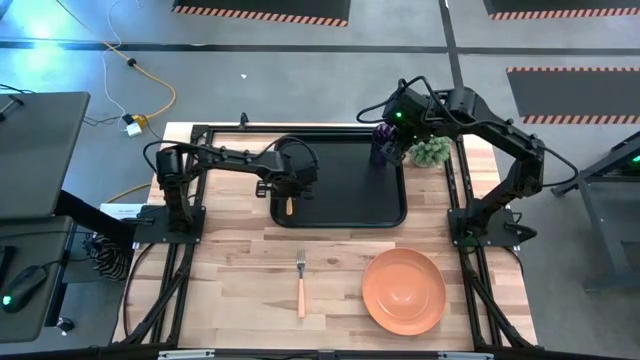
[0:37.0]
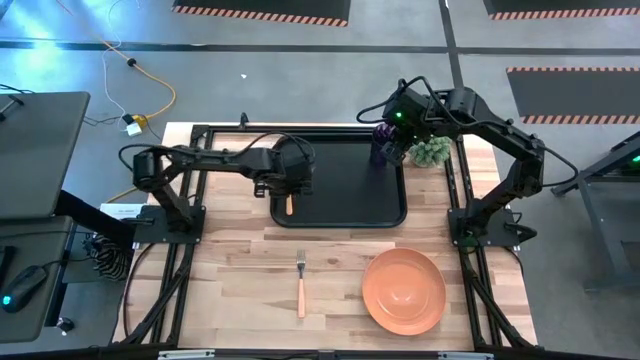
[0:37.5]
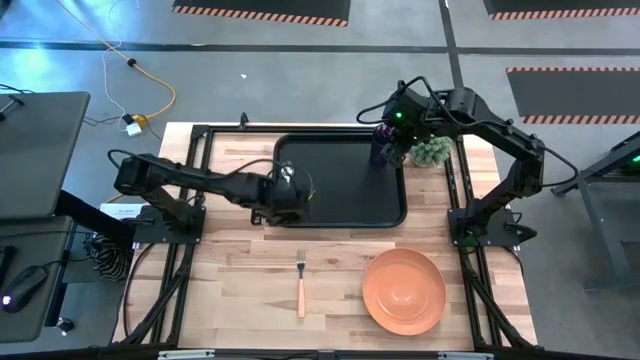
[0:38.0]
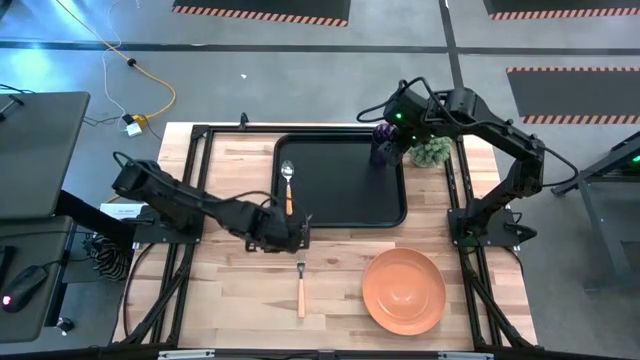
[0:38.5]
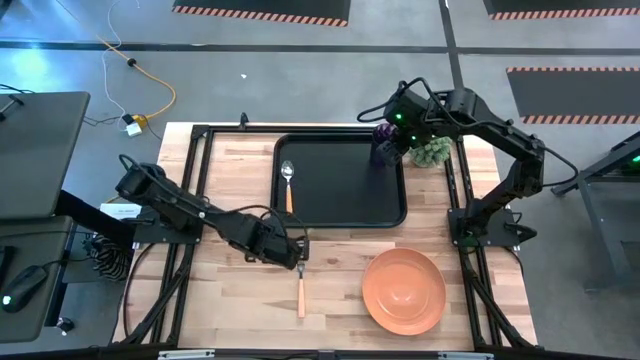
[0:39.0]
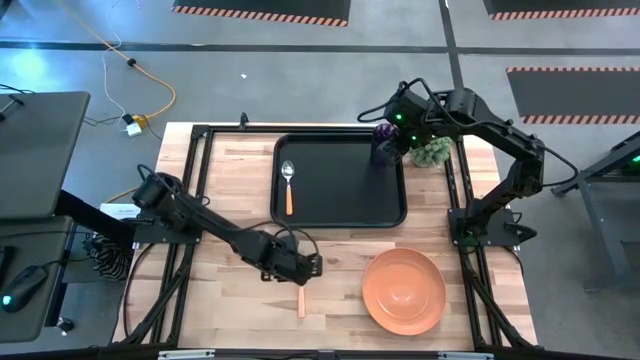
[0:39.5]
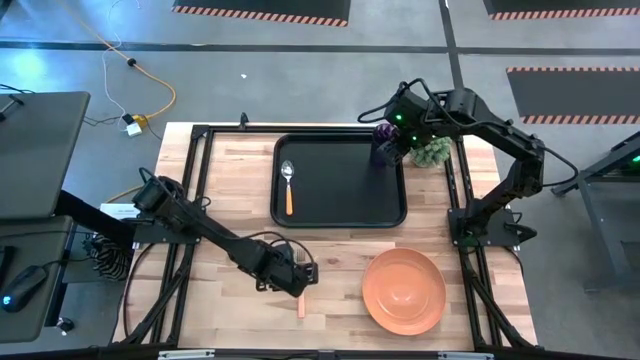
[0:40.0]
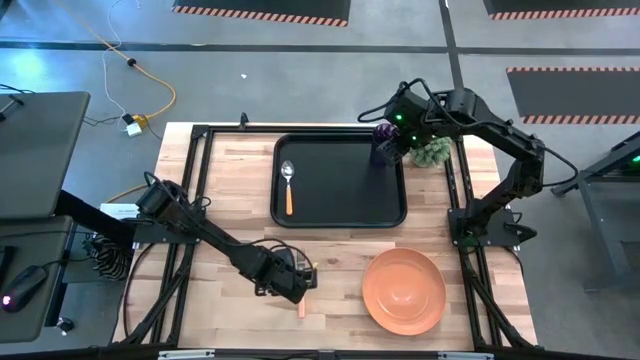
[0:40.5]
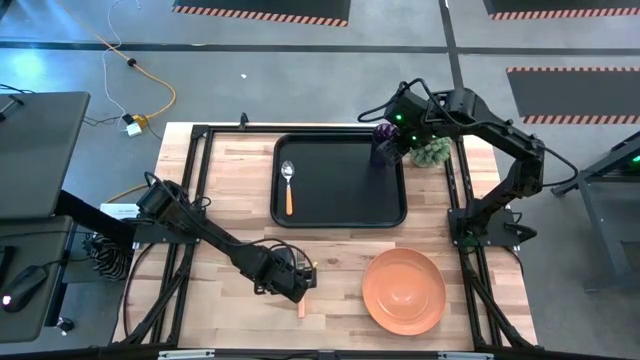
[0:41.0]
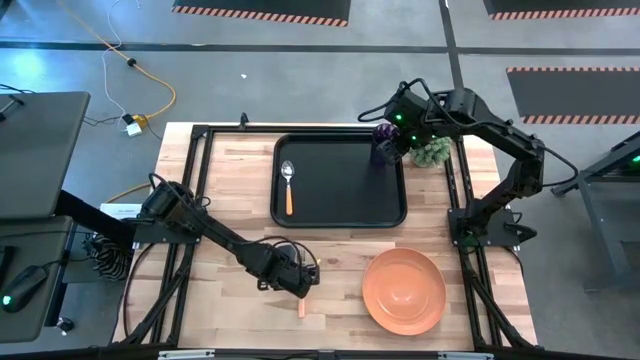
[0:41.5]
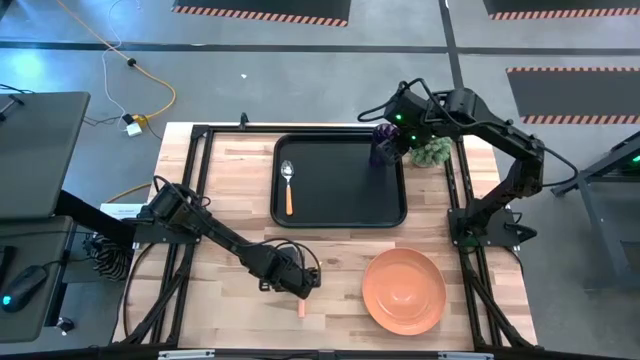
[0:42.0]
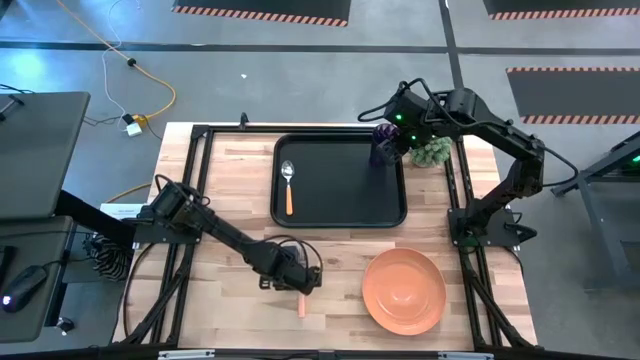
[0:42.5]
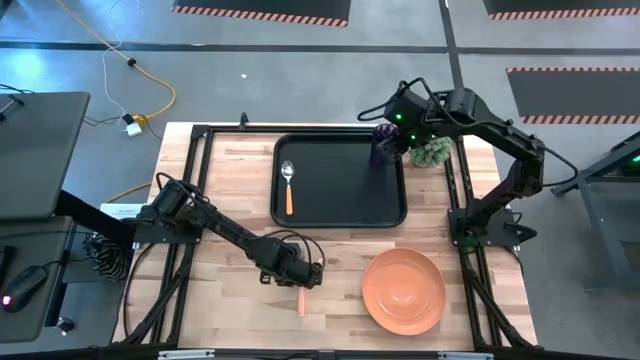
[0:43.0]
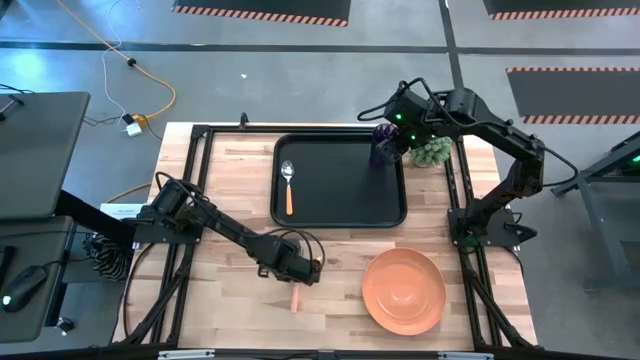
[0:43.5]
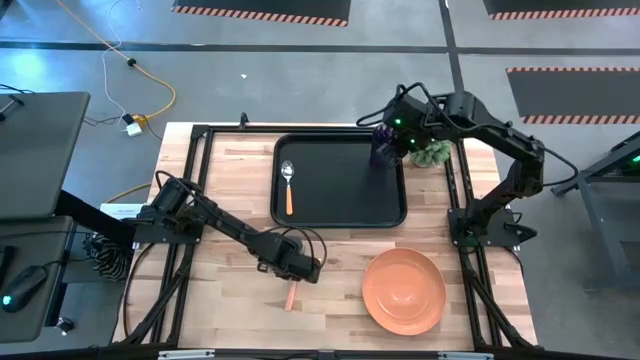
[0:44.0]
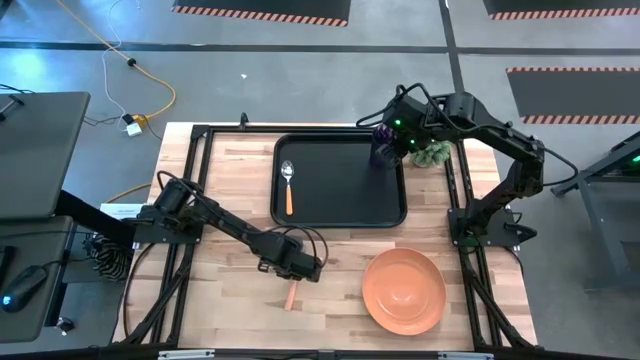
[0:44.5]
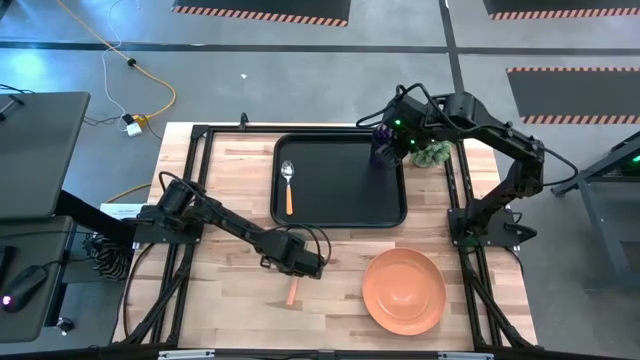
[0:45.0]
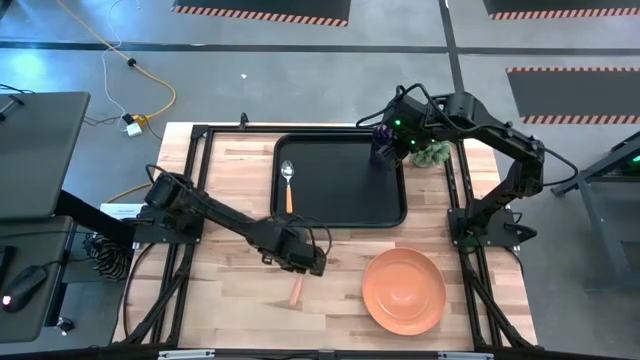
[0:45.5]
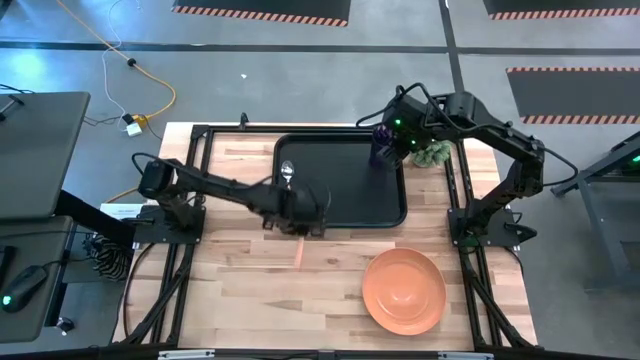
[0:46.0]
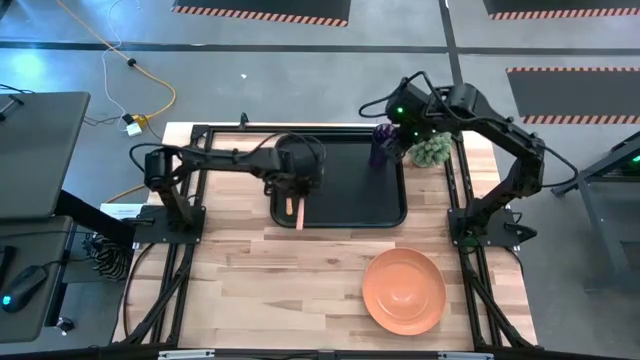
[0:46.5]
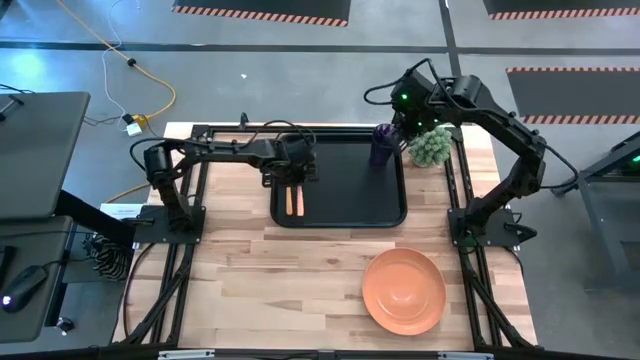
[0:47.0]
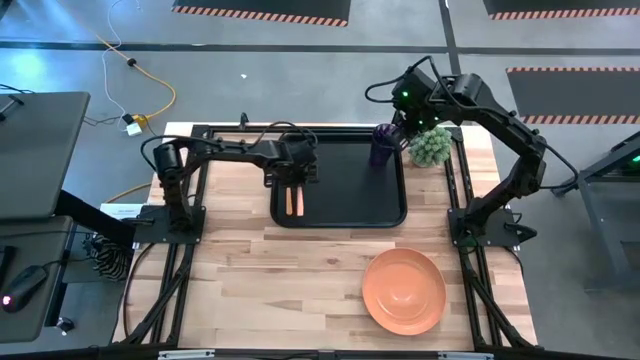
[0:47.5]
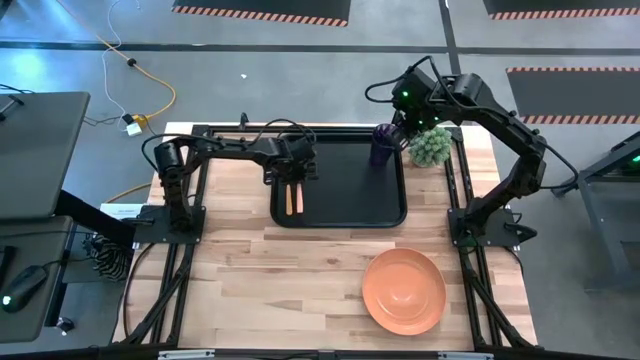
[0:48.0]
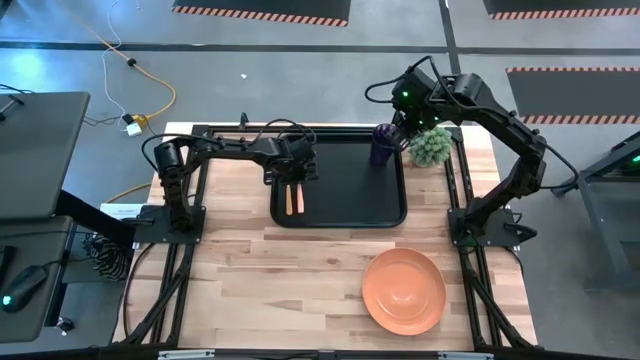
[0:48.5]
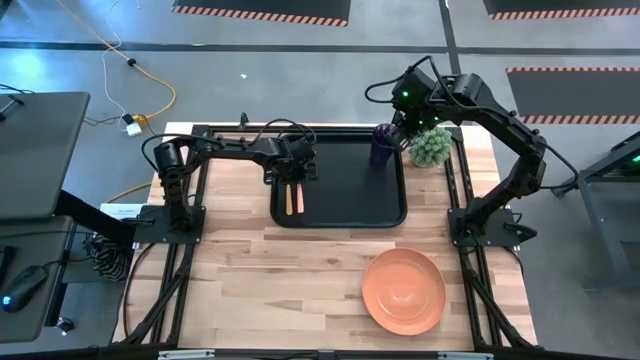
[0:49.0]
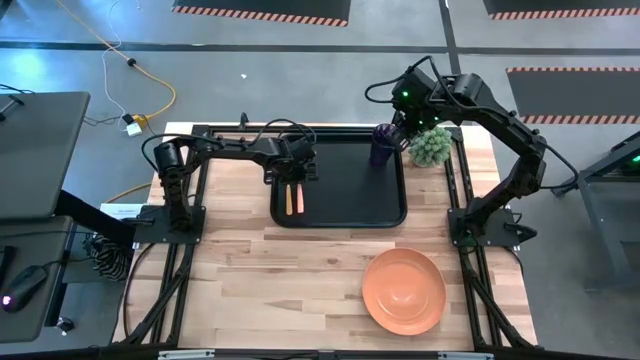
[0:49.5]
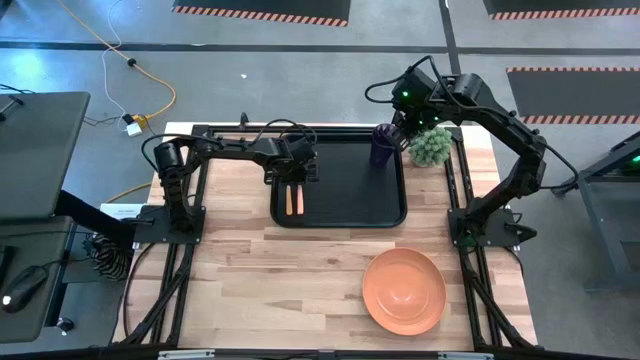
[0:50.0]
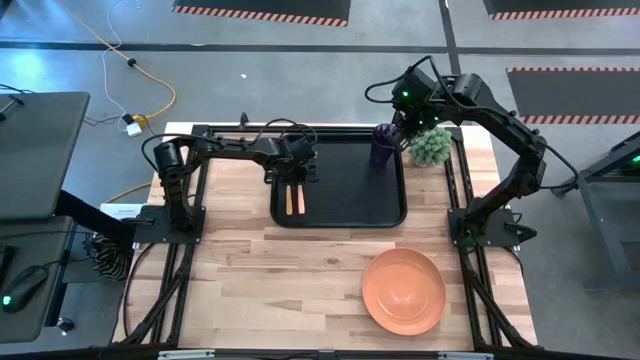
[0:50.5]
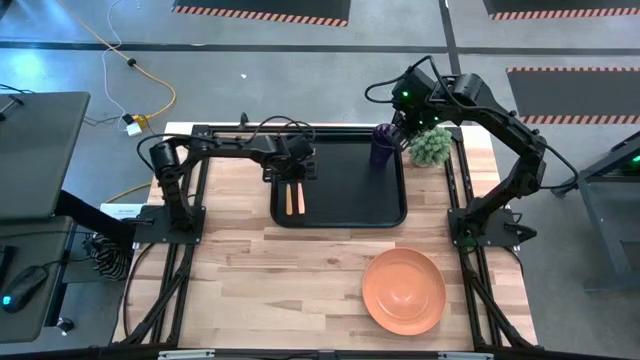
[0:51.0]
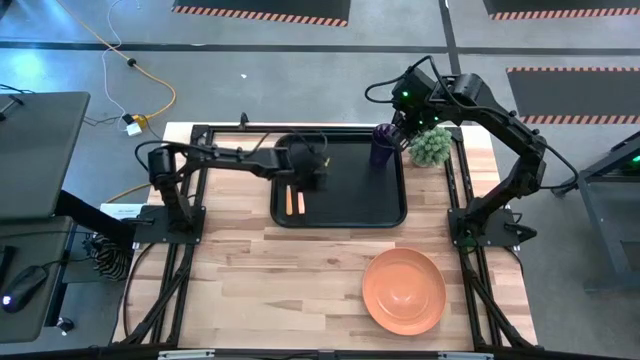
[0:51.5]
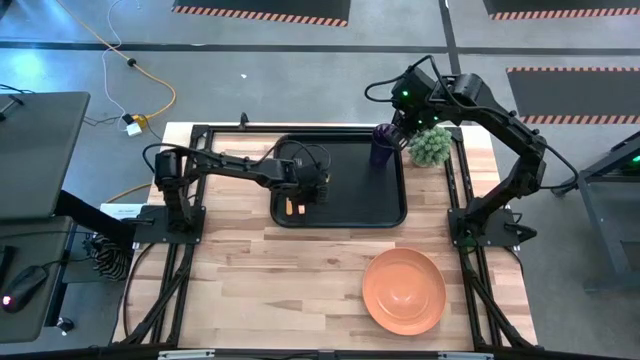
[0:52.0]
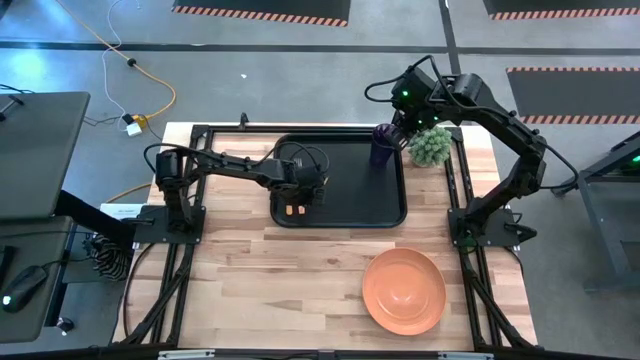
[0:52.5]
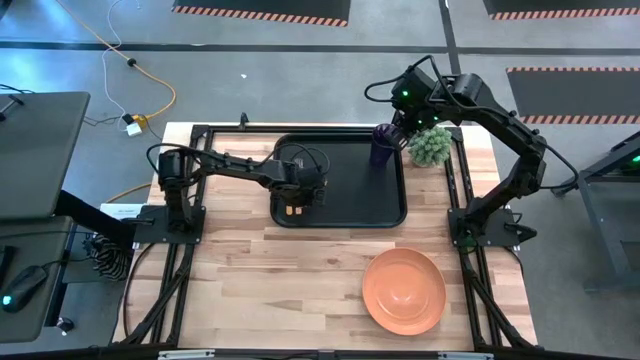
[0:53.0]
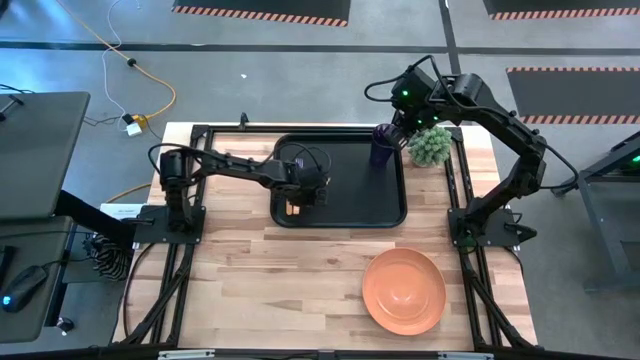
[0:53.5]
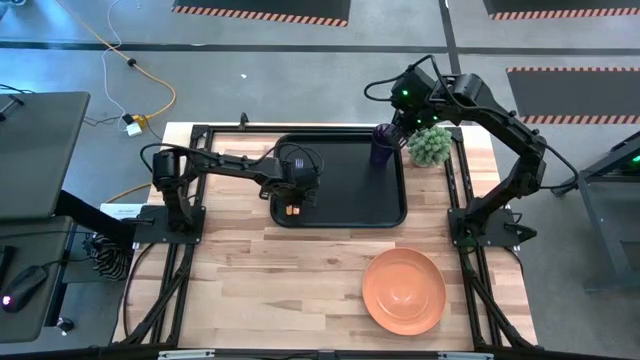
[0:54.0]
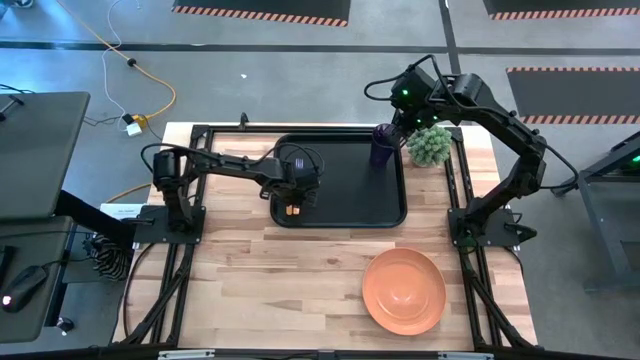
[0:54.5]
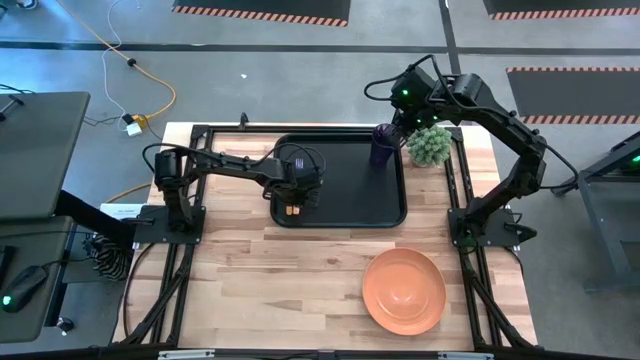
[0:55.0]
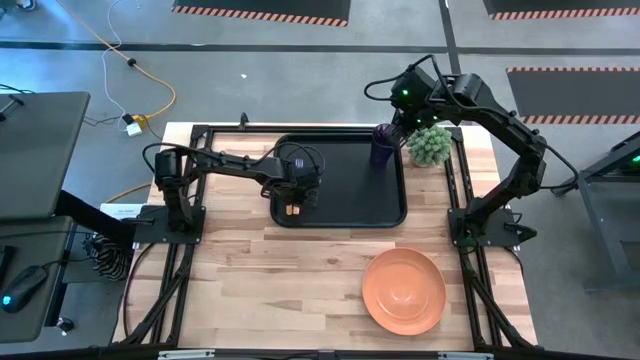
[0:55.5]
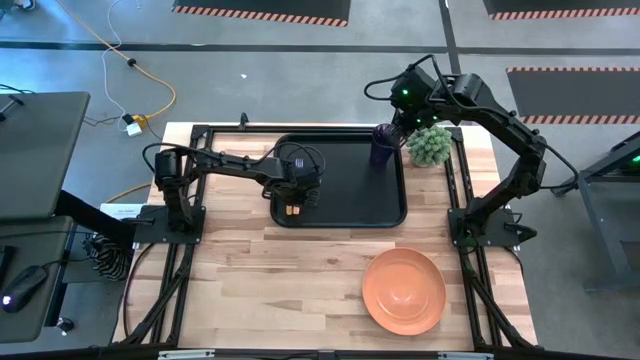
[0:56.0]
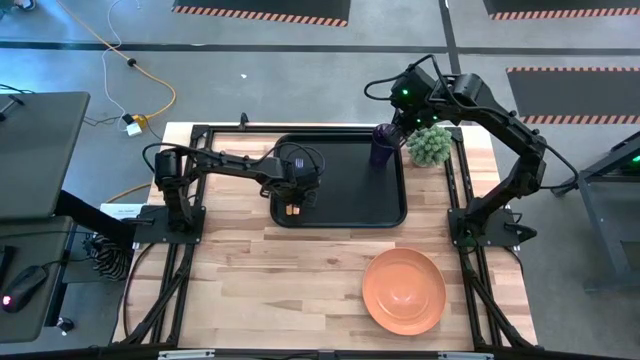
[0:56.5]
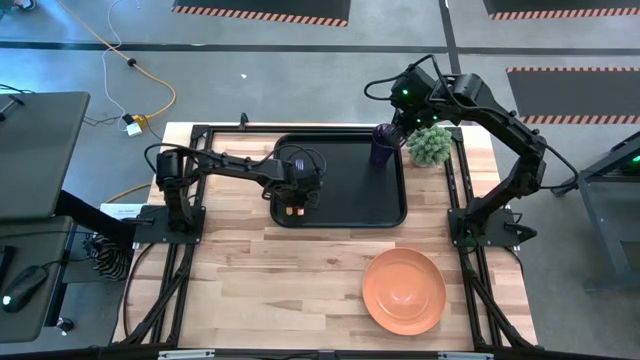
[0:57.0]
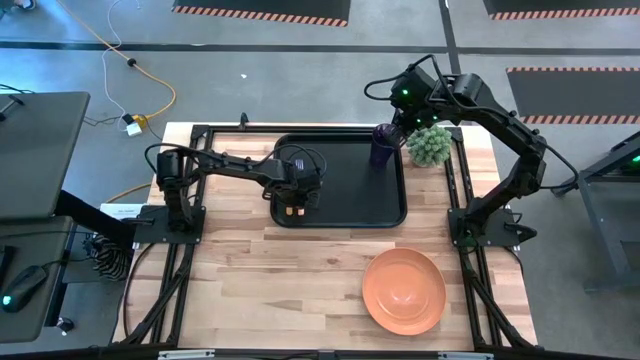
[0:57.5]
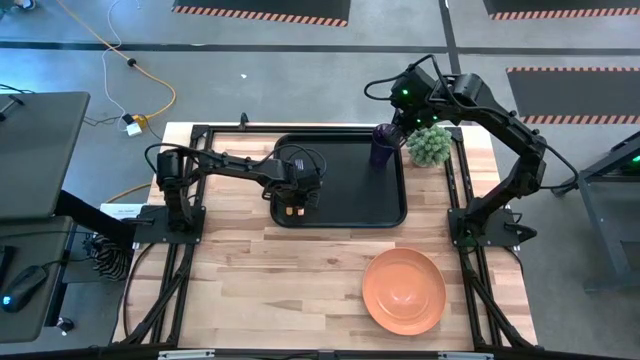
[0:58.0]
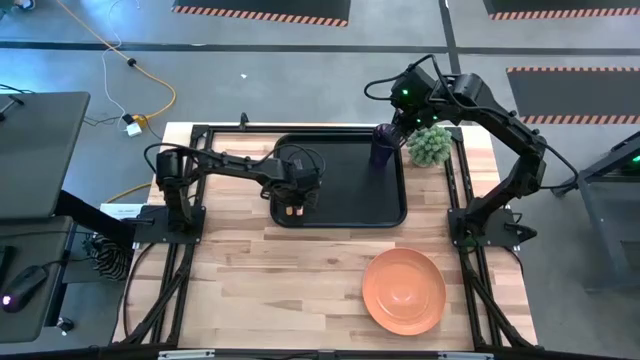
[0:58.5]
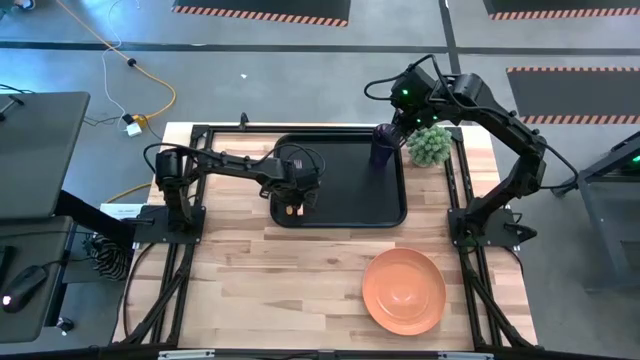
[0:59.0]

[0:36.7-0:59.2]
Task: Pick and place plate/cup/fork/spoon on tray
Put the orange fork on the black serving tray to the right of the yellow fork
